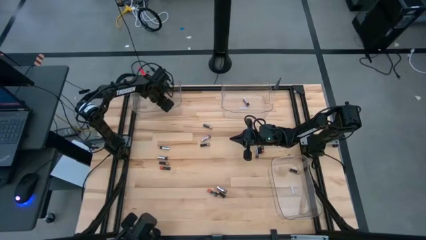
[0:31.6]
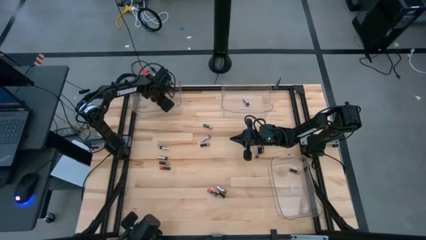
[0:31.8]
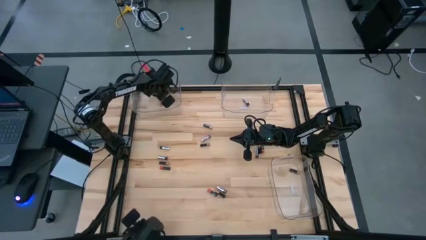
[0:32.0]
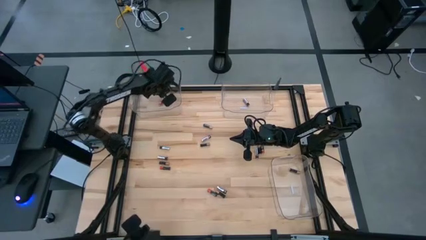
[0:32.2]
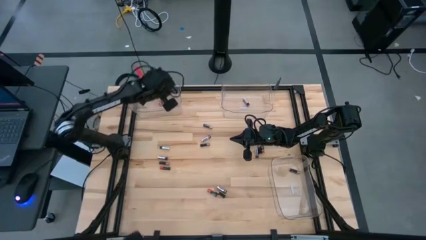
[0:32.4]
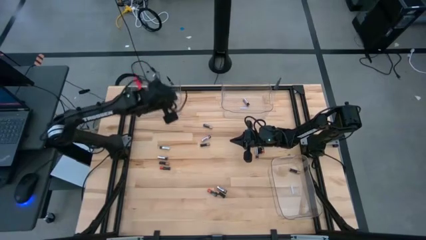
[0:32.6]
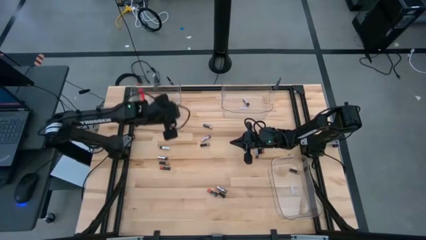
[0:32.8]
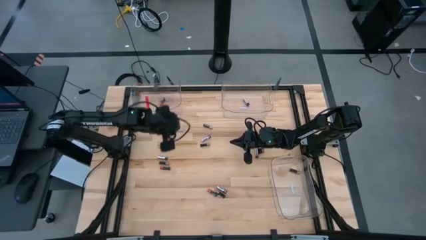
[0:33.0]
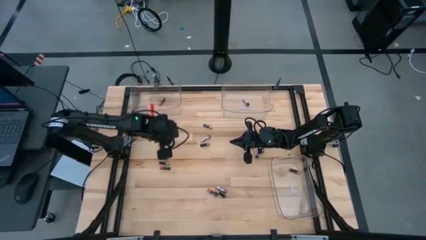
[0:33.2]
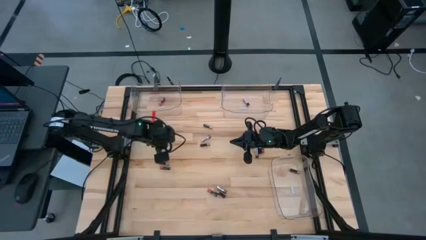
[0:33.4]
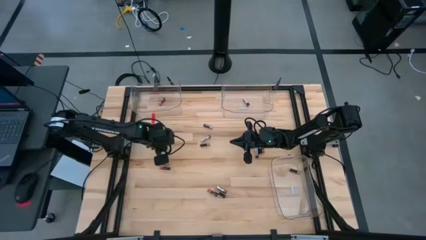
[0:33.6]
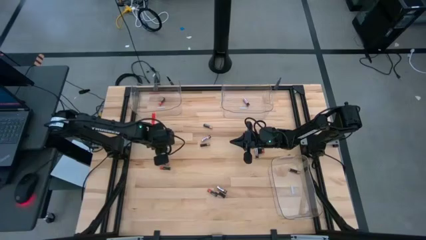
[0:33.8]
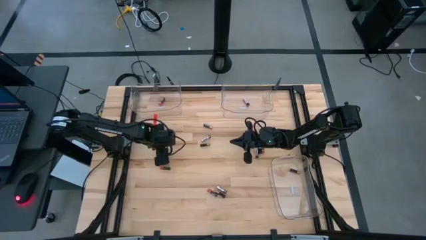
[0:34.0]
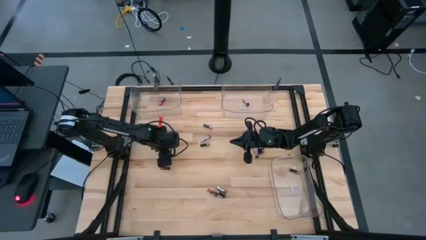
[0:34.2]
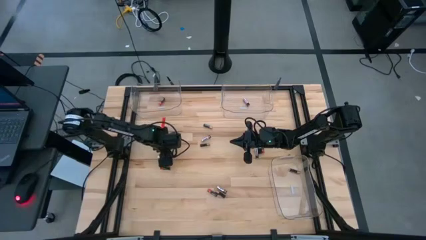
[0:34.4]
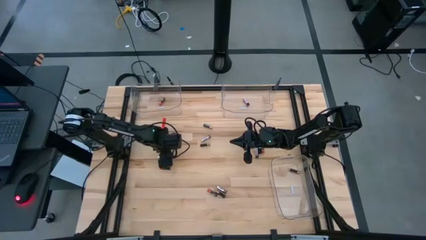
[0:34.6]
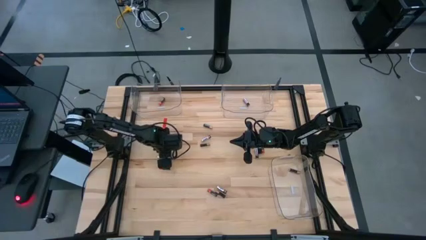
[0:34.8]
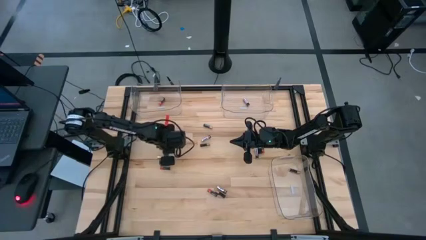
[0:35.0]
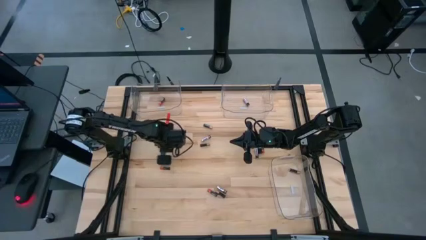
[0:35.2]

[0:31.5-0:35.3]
Task: Sort batteries
Put the silver battery into the top right transparent bin

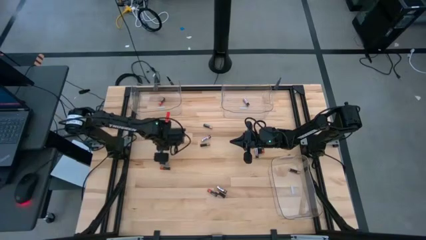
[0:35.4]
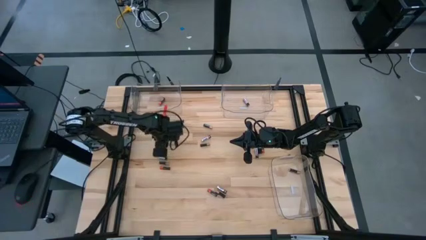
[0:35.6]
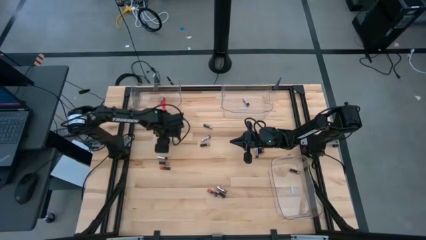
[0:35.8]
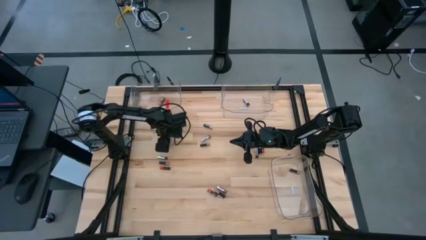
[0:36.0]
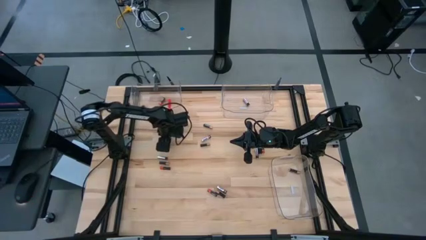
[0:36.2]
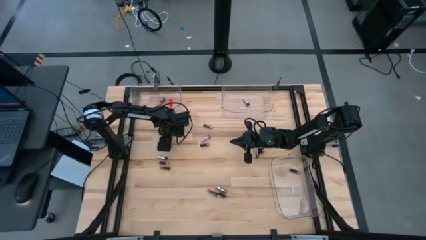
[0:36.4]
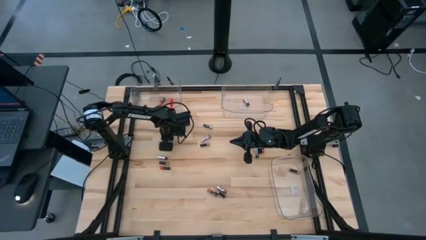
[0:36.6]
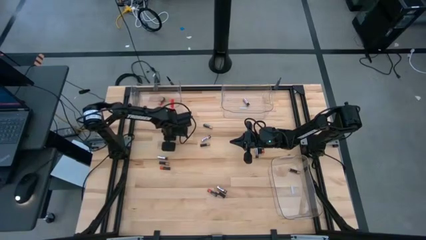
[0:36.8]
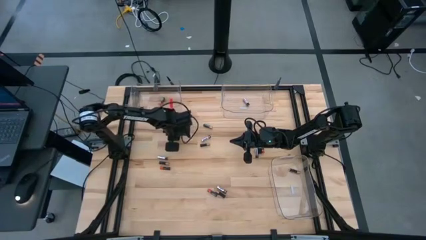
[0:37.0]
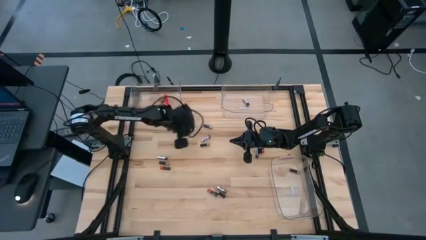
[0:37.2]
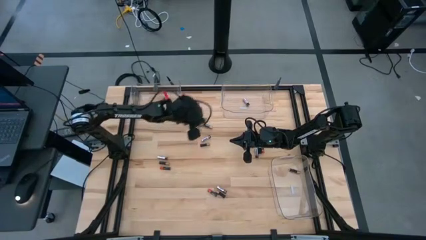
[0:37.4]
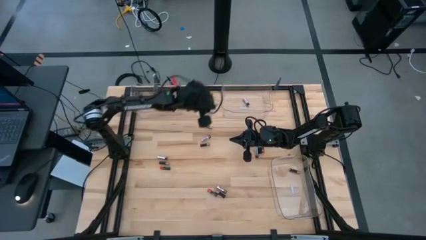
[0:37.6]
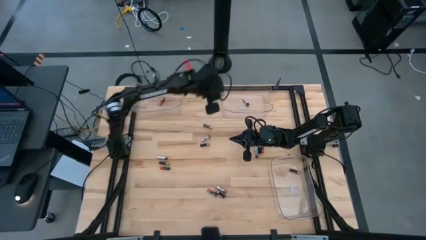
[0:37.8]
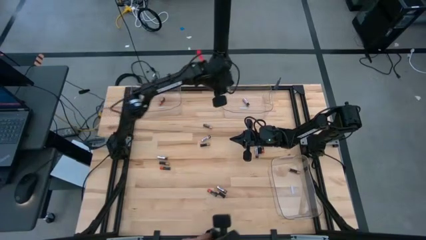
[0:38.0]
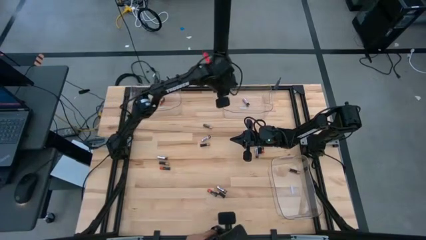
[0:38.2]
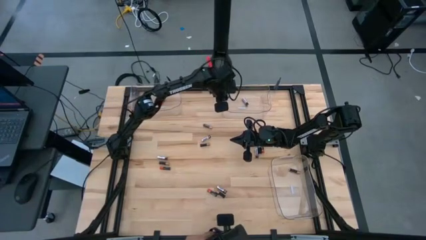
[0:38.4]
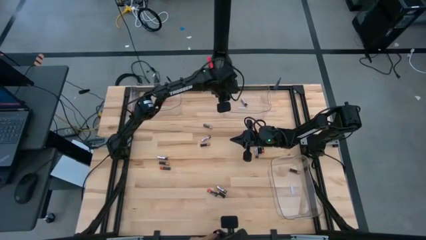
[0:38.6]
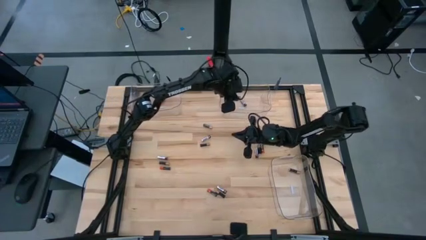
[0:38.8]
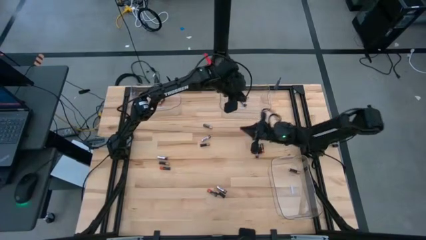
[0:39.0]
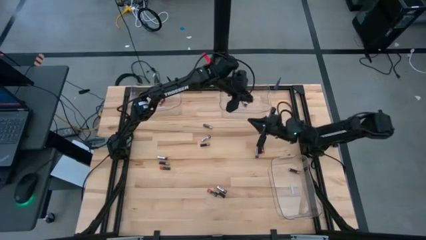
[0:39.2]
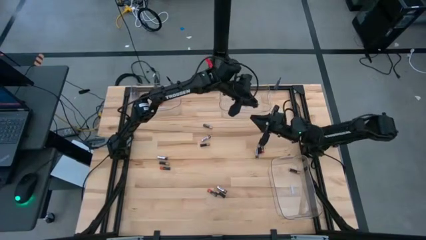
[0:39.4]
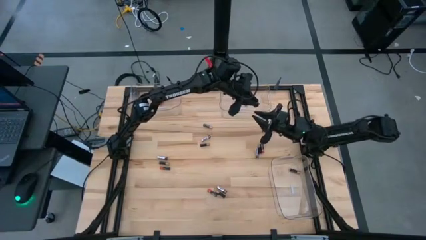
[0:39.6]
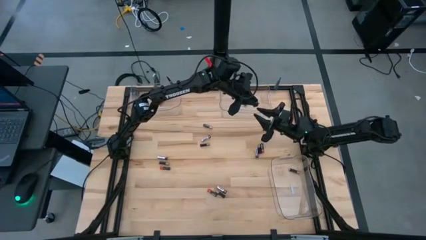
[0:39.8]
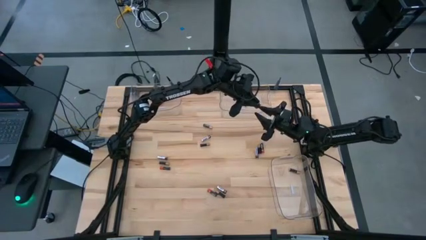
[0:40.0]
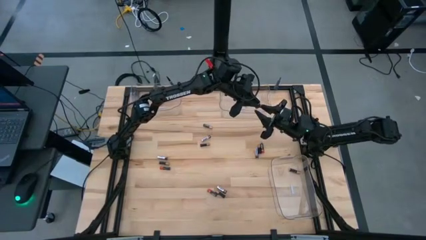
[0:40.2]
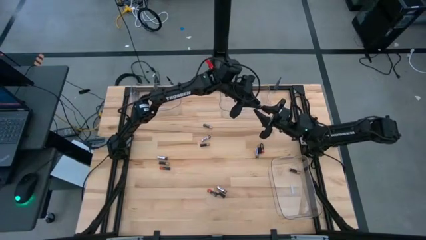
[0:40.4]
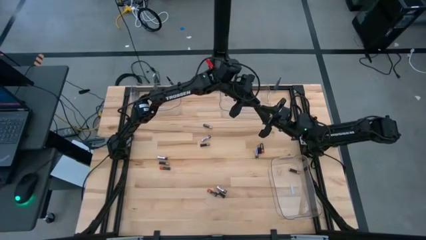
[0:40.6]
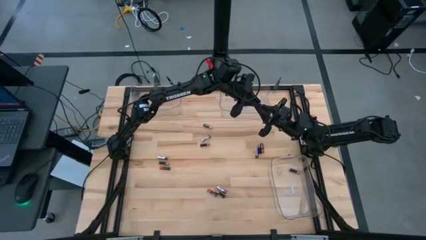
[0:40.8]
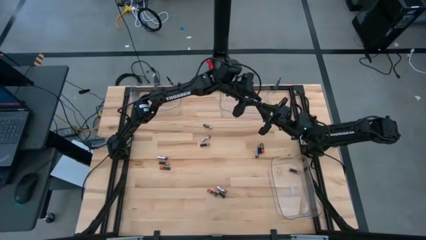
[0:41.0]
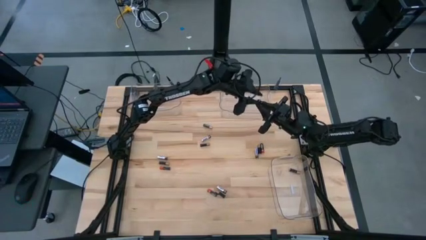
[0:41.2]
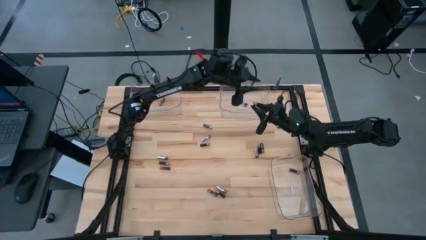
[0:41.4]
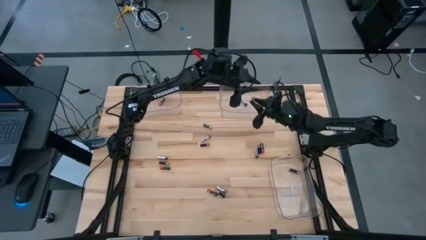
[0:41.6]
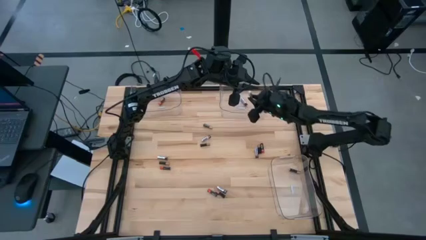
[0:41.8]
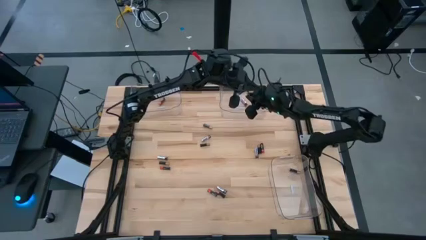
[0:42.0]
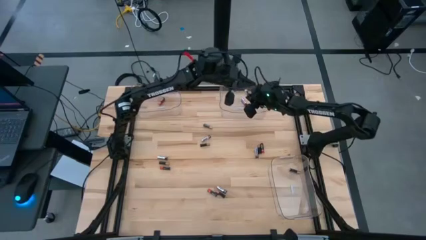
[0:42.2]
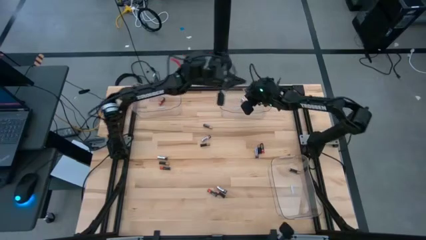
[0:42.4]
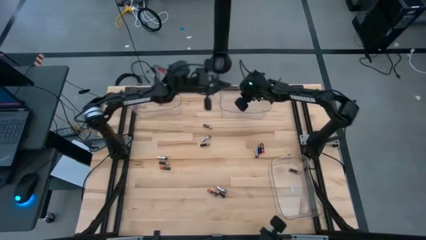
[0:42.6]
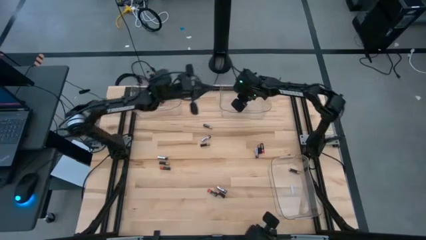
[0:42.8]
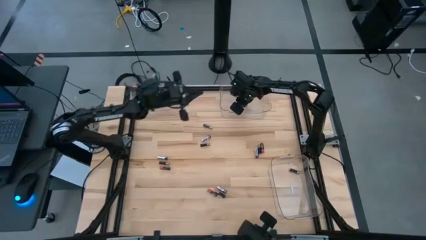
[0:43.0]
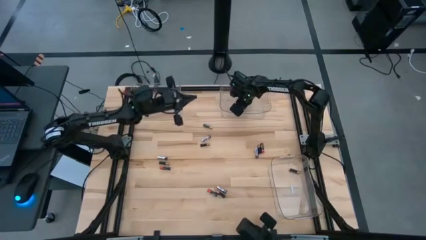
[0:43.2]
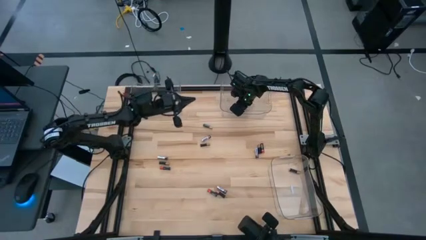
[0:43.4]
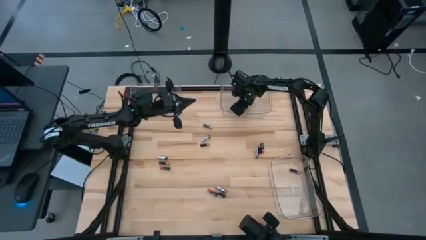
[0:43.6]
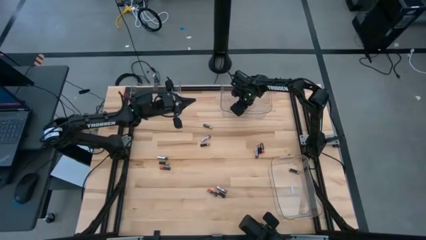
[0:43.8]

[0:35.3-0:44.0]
Put the silver battery into the top right transparent bin

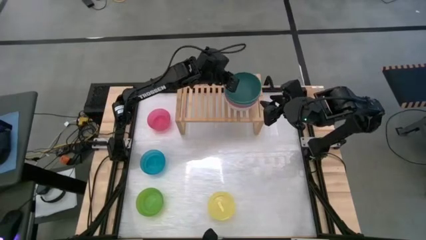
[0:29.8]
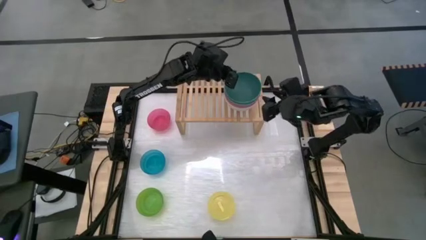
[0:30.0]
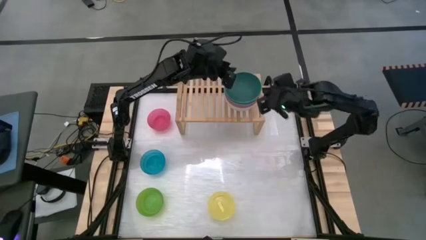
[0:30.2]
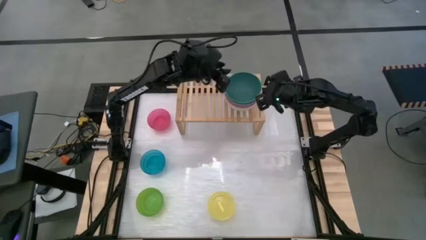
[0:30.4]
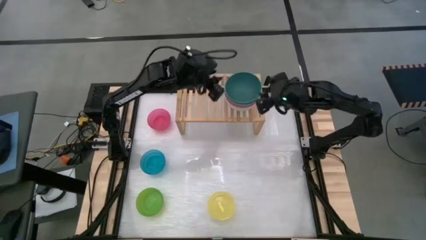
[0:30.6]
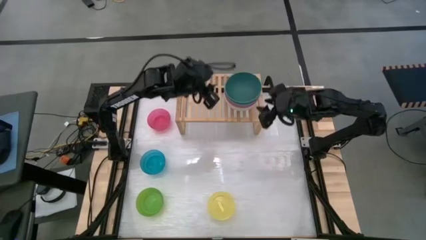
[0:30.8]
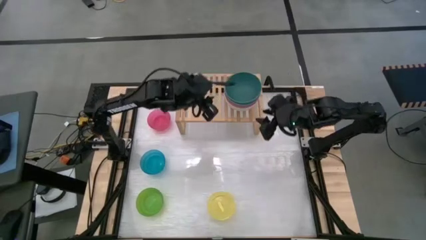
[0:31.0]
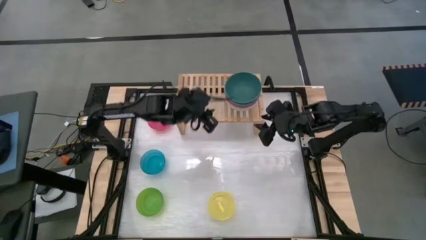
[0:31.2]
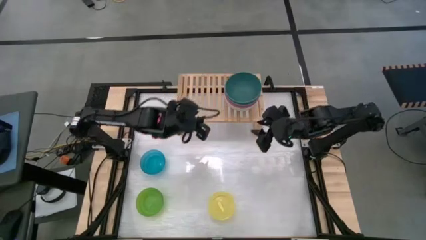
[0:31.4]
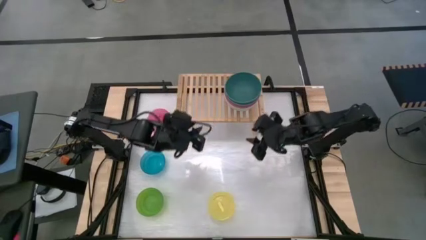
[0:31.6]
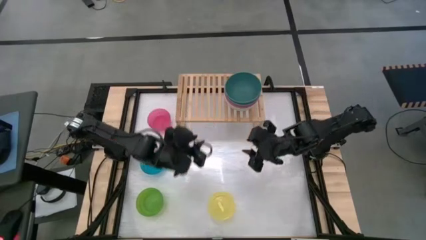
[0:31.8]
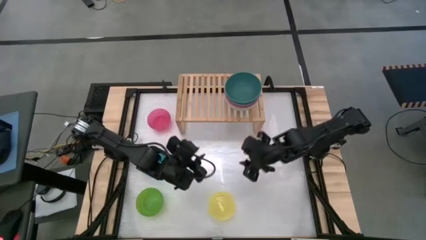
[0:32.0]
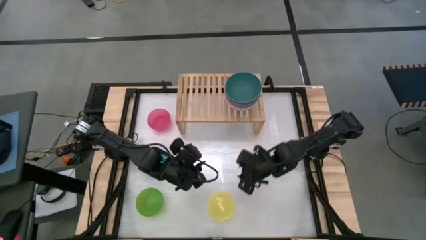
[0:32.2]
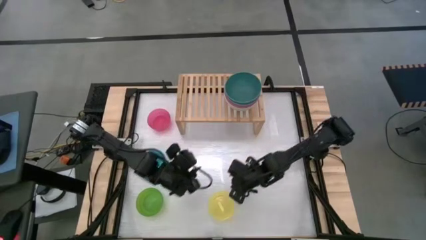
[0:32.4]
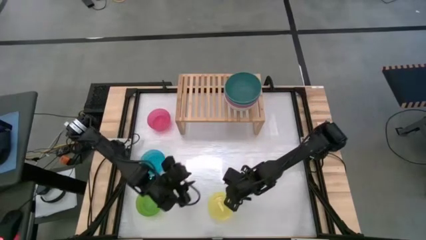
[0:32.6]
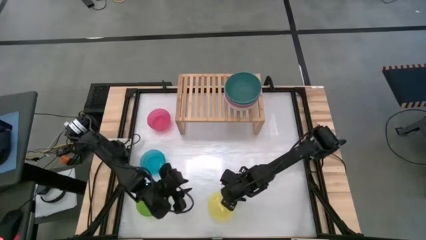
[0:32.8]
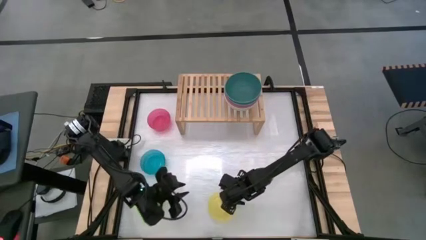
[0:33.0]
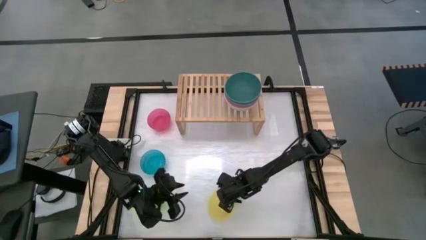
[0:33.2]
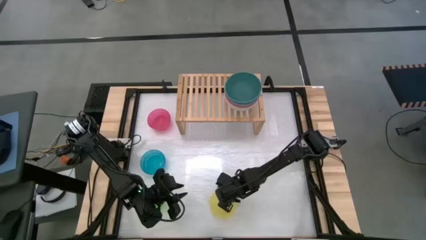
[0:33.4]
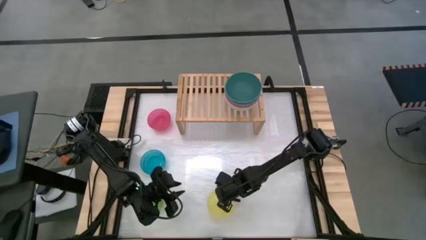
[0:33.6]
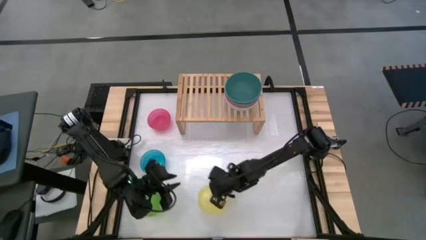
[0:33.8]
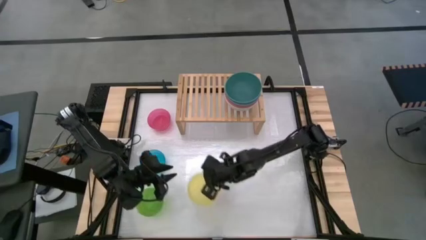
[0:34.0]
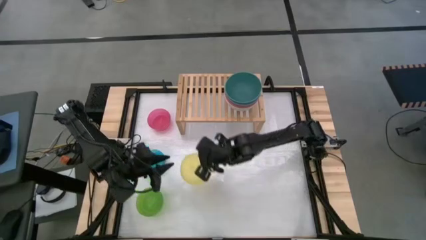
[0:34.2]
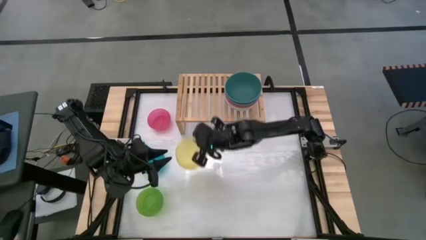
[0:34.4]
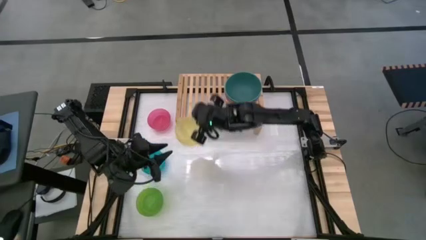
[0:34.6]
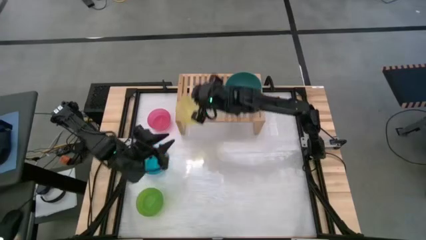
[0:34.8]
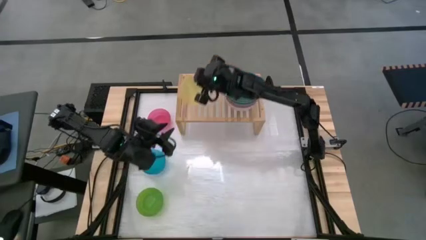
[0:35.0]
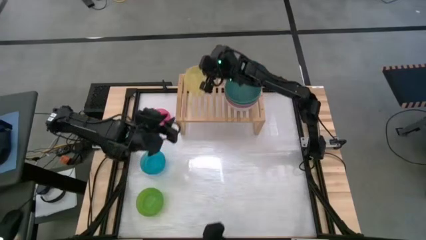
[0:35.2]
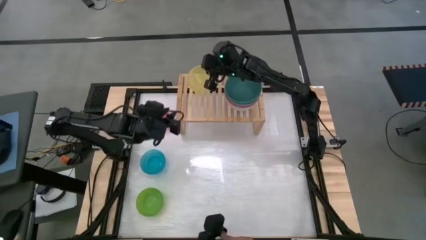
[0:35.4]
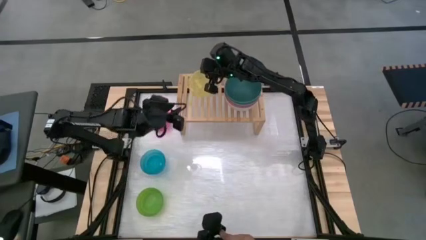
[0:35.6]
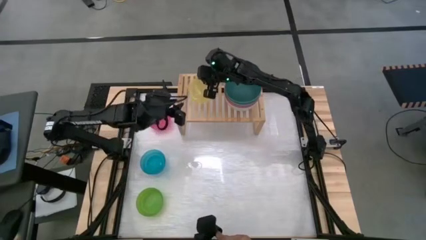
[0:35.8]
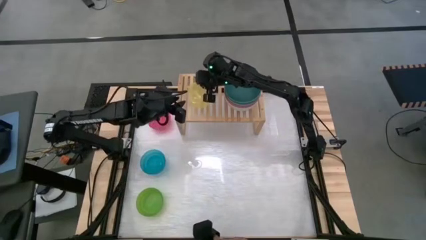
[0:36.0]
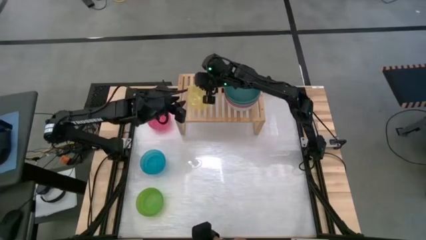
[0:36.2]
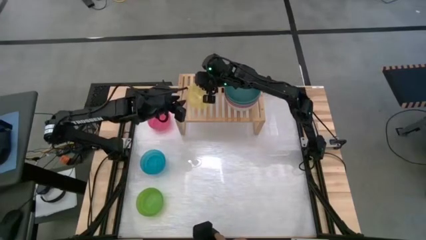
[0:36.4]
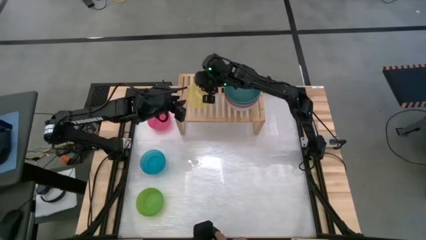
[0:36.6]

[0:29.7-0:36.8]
Task: Place and stack bowls onto a shelf
Put the small yellow bowl on the shelf
